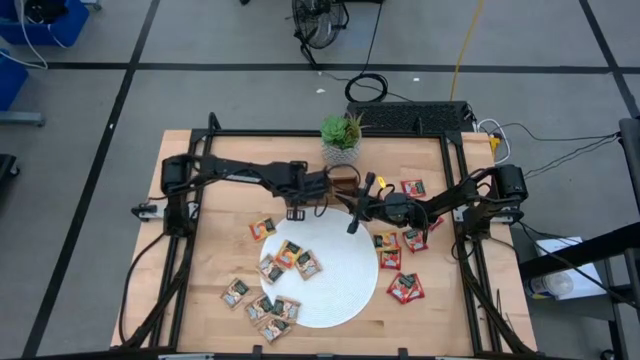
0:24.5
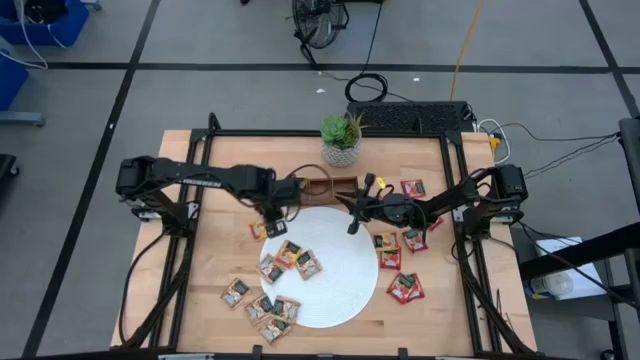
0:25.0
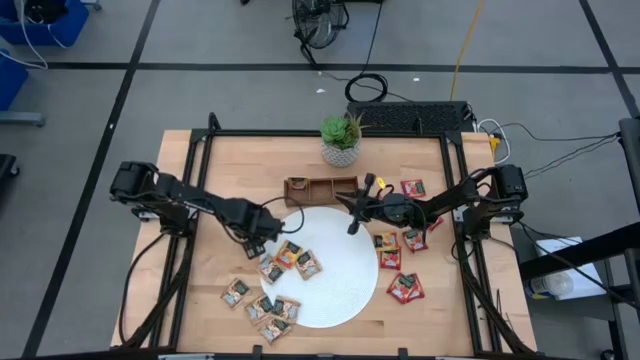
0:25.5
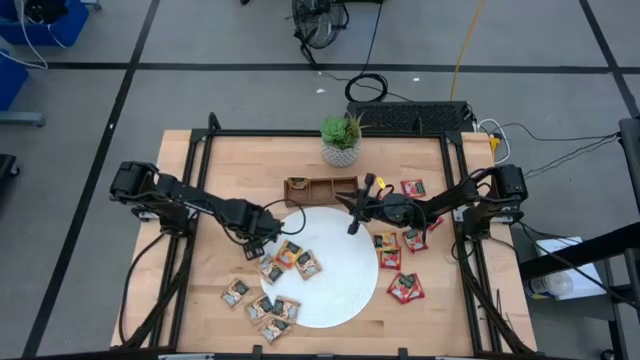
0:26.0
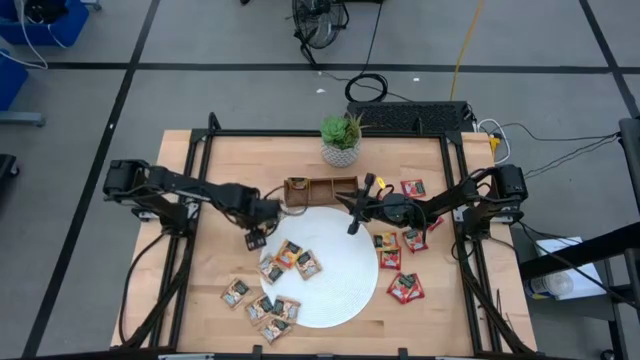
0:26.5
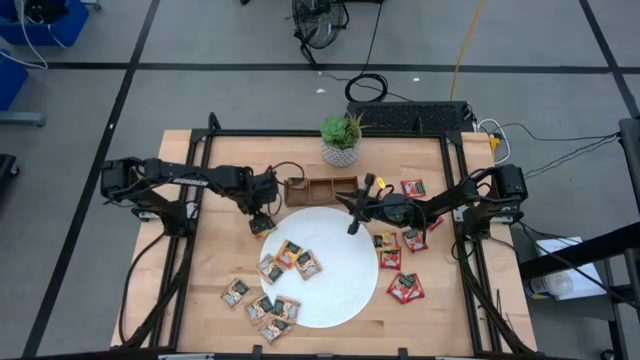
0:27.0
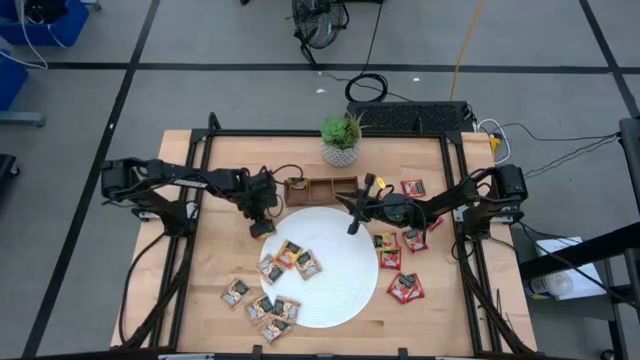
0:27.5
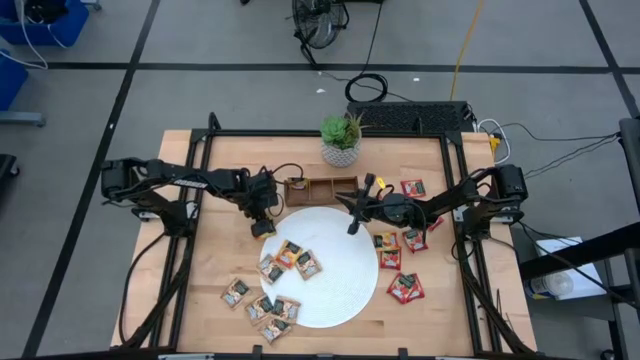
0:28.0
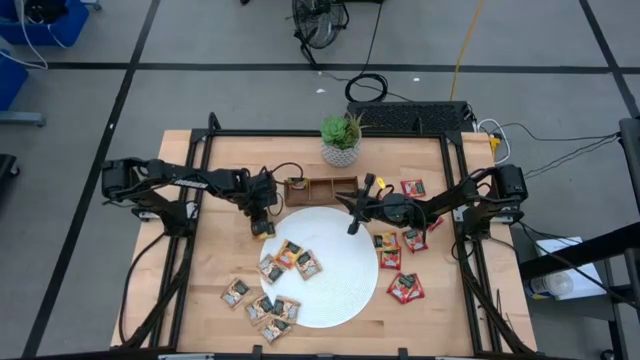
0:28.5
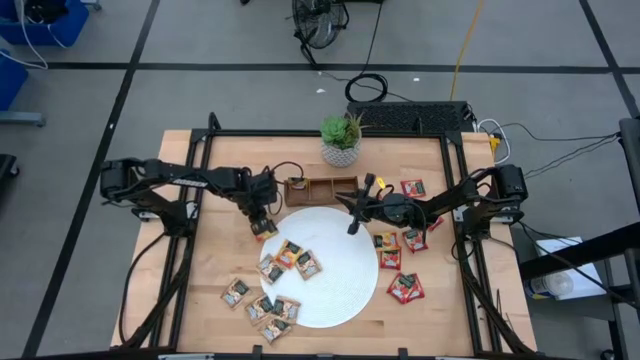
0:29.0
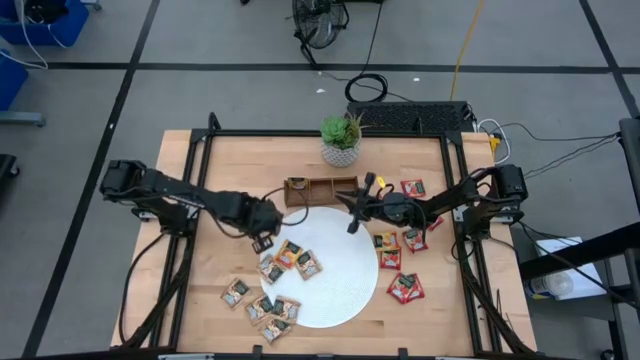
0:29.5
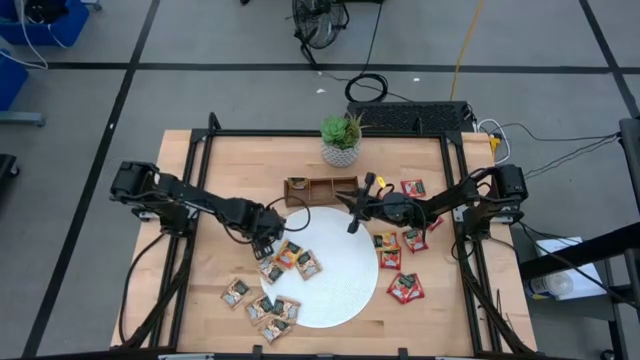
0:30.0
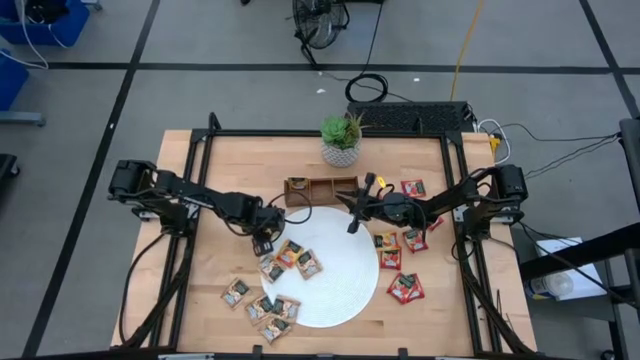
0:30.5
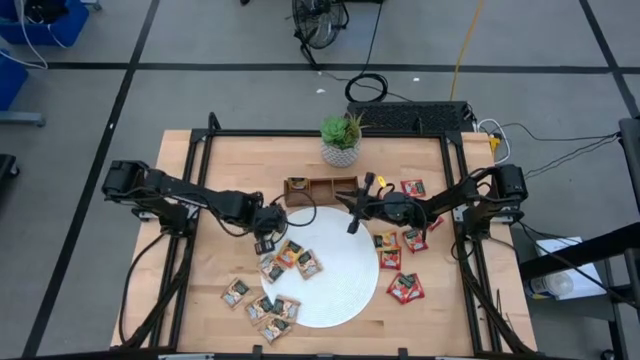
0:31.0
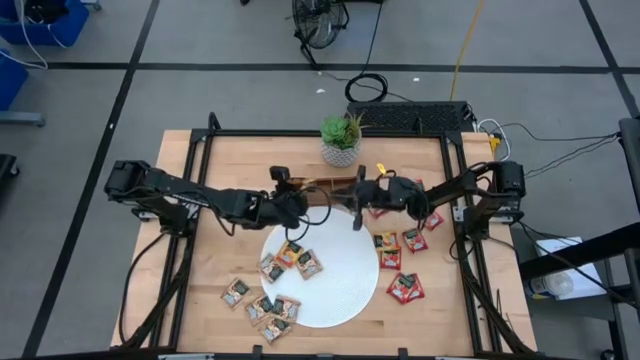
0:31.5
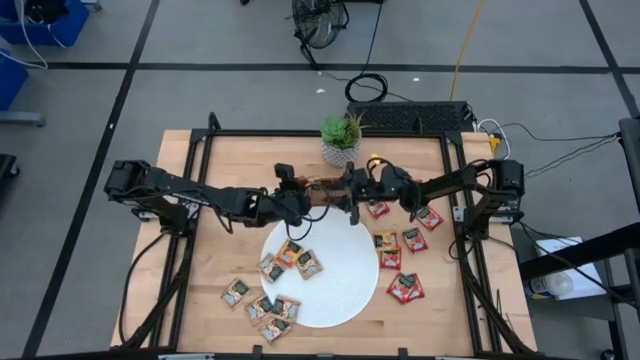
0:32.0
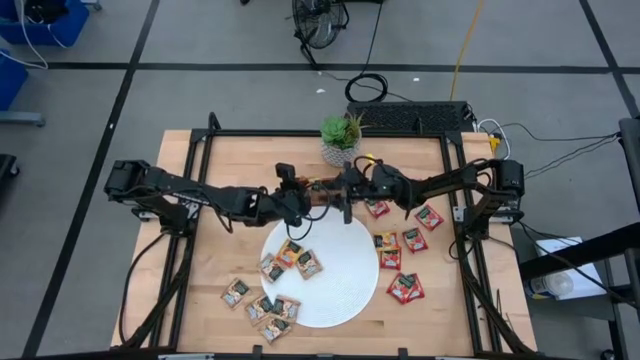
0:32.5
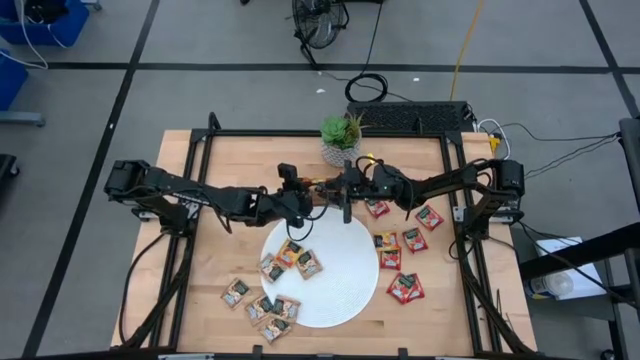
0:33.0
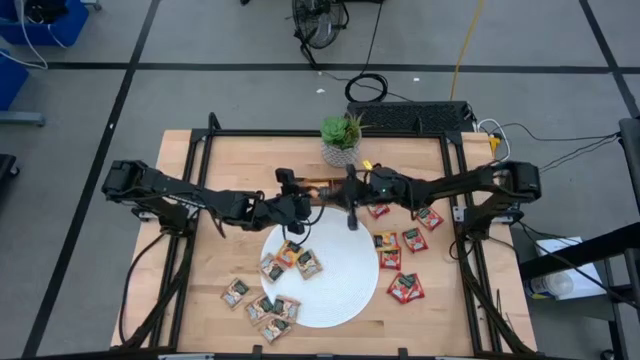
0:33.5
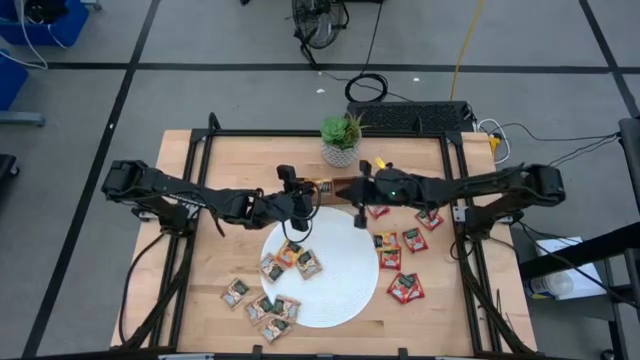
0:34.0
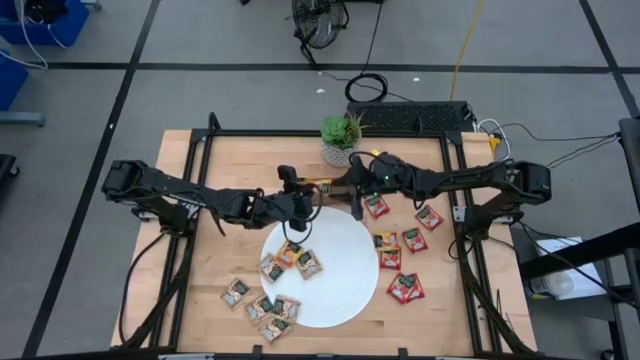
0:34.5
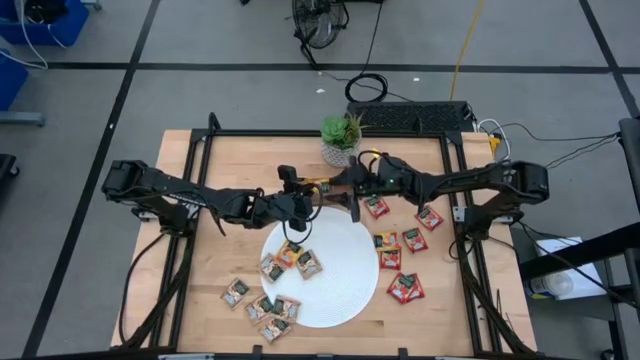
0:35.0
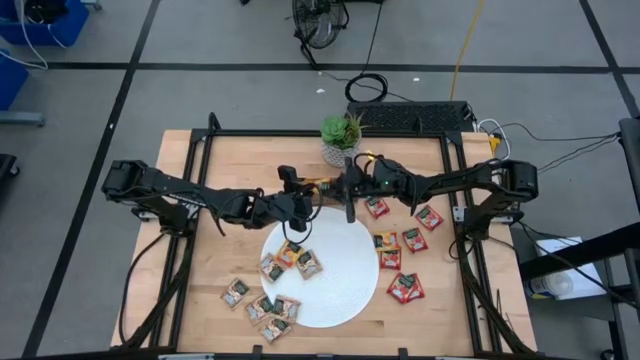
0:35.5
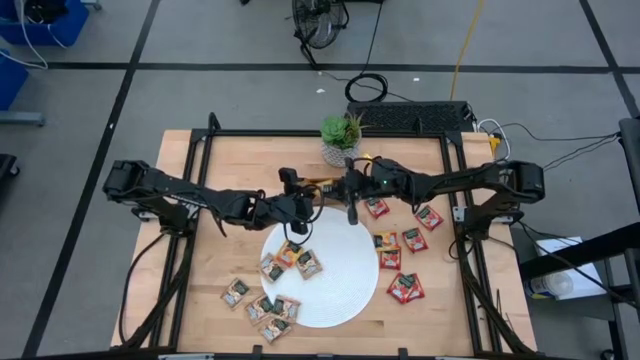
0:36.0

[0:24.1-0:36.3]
Task: Pick & Place Tea
Put the mango tea bag into the wooden organizer

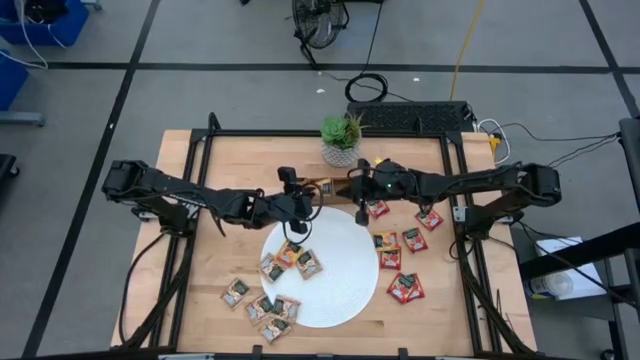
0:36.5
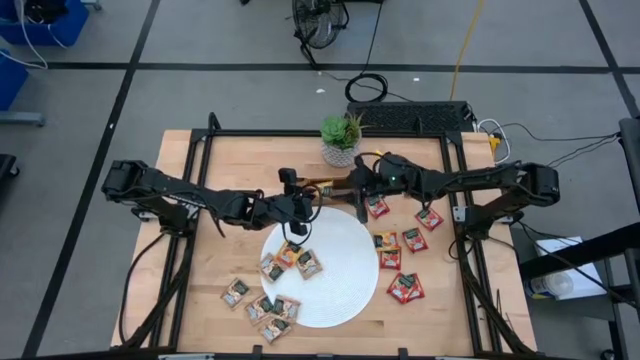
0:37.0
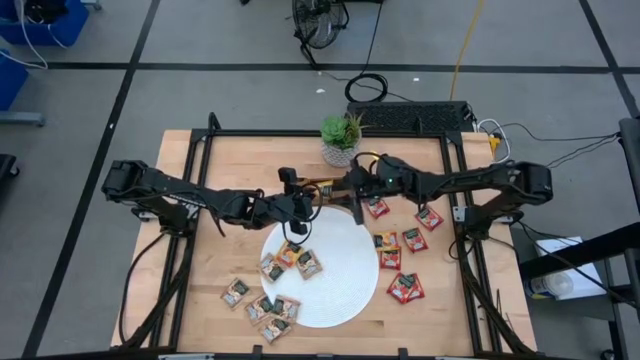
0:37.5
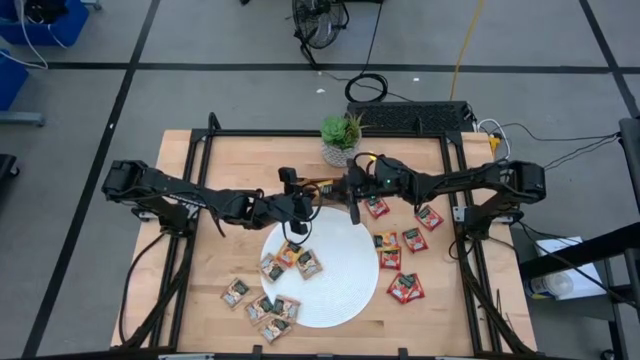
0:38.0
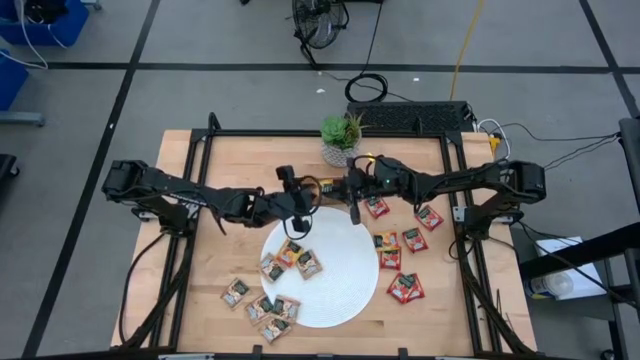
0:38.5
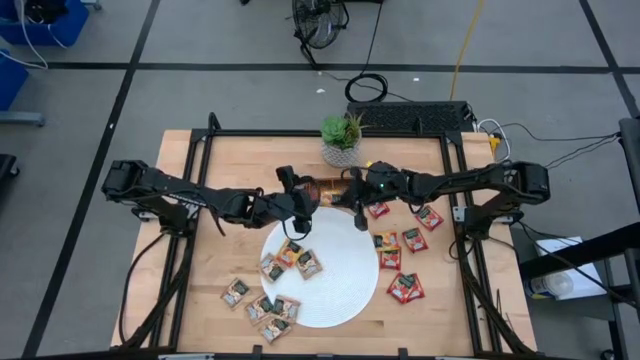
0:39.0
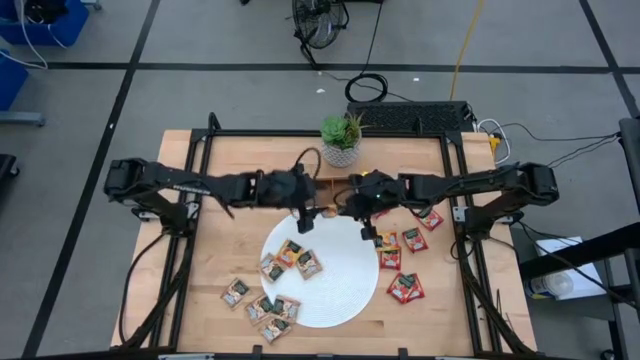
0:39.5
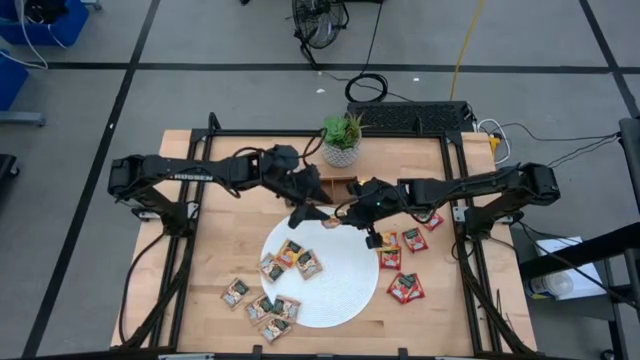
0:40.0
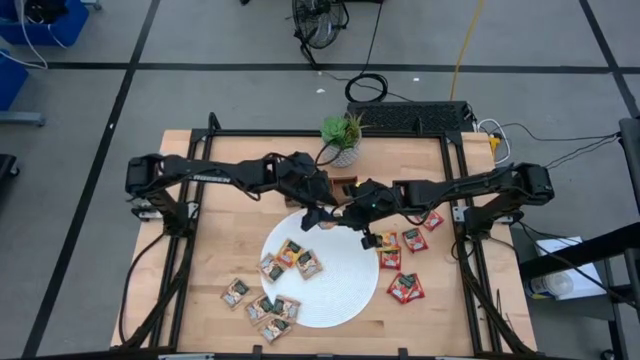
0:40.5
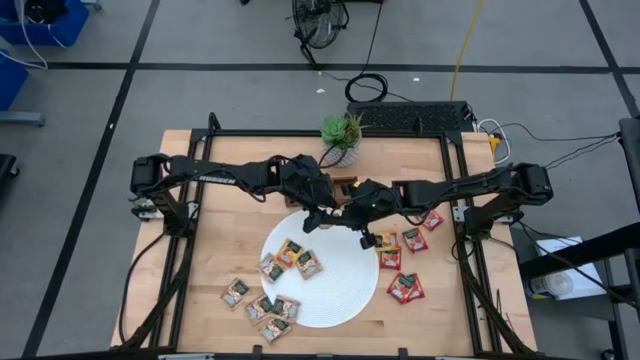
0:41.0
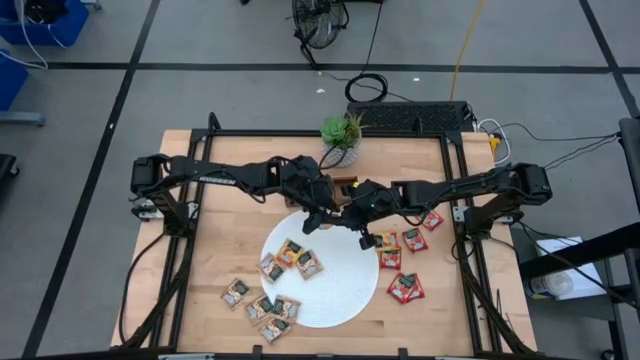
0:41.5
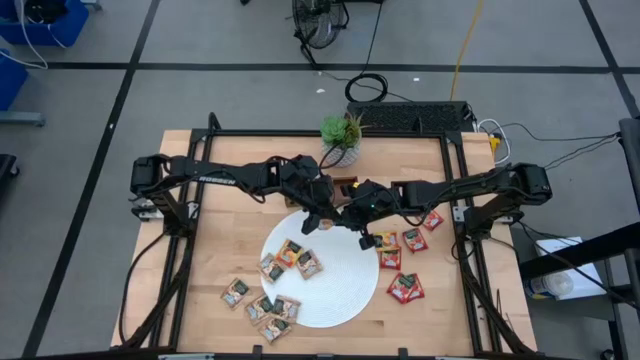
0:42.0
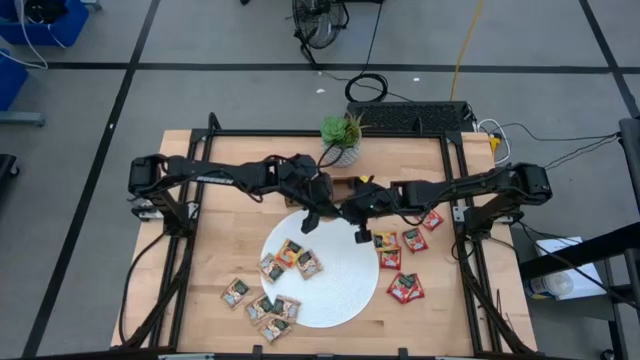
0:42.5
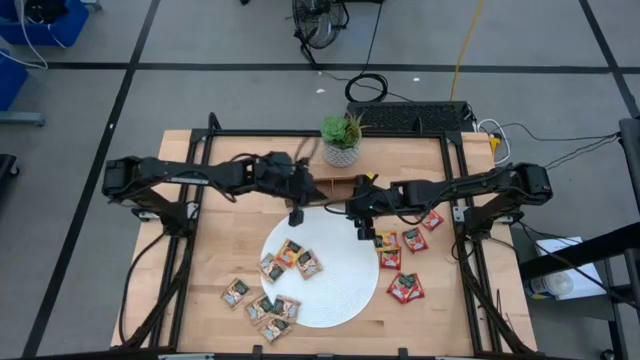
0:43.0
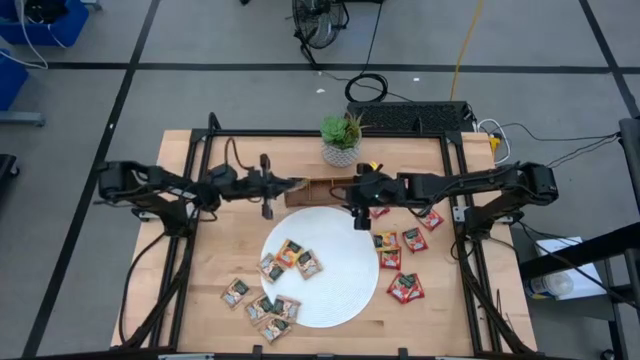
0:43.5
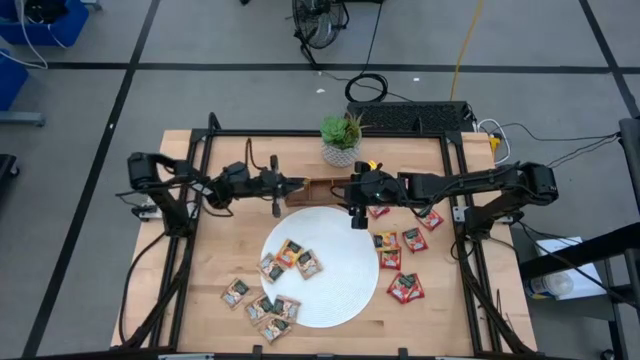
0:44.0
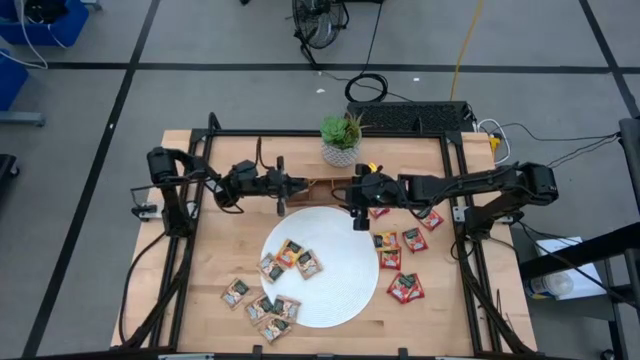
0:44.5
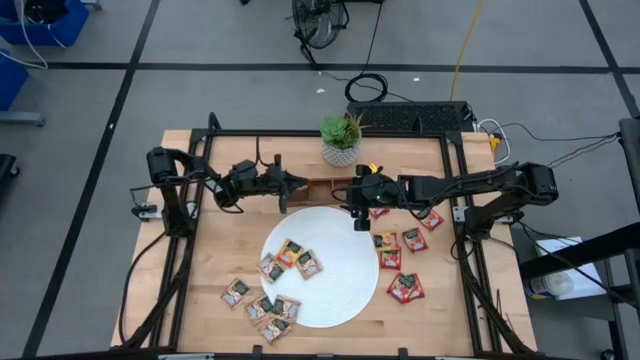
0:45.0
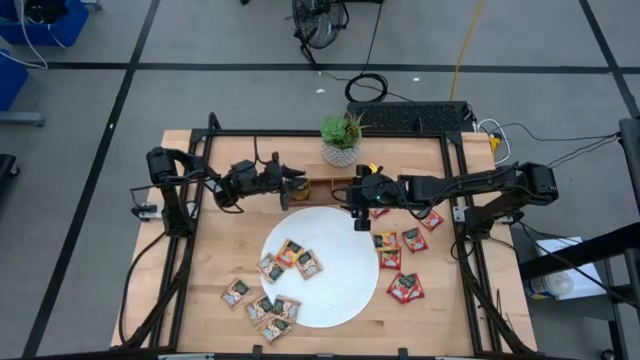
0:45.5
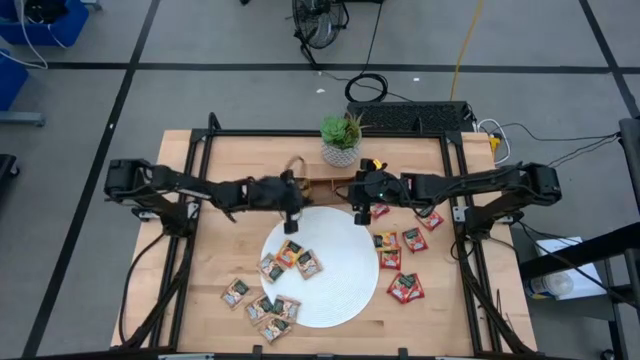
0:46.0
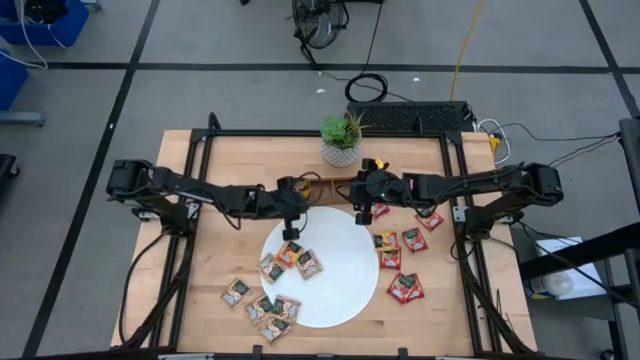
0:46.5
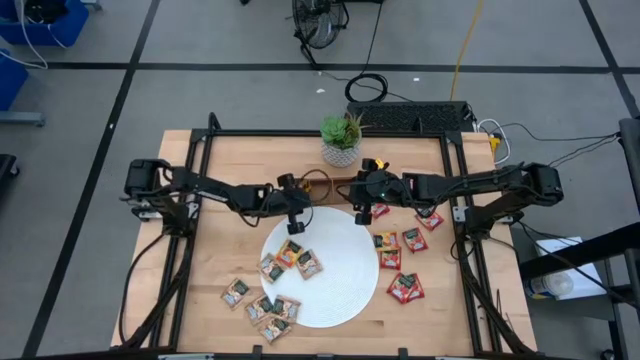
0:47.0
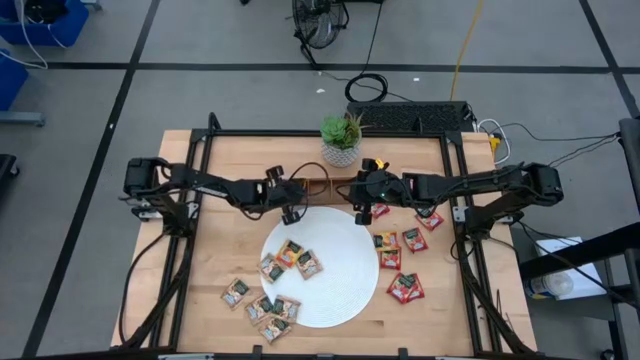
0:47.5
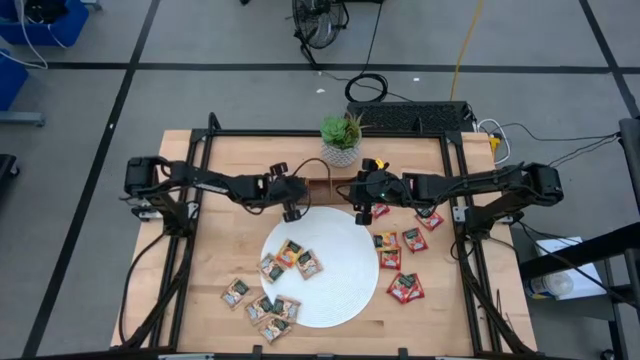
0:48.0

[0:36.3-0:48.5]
Put the mango tea bag into the wooden organizer
